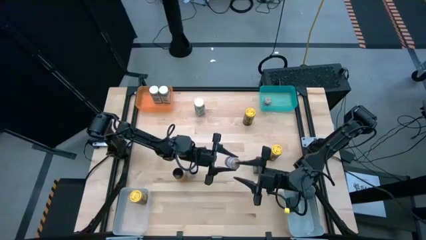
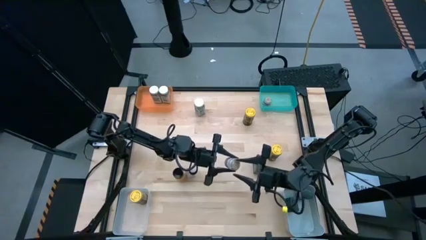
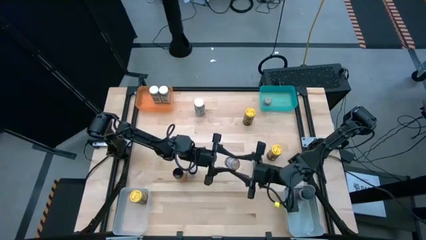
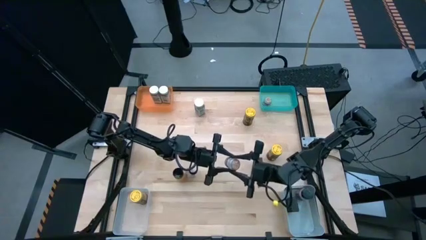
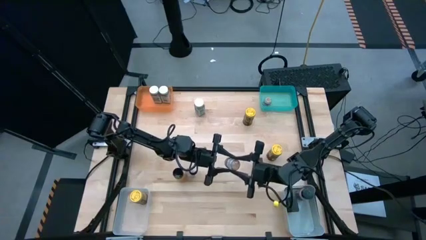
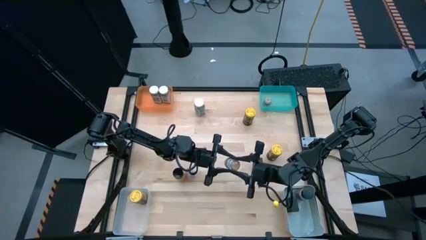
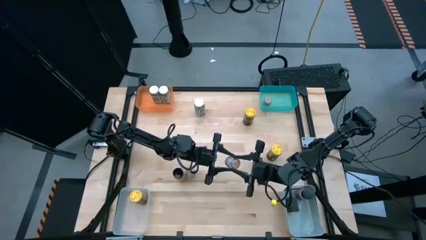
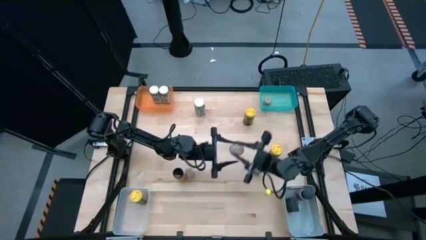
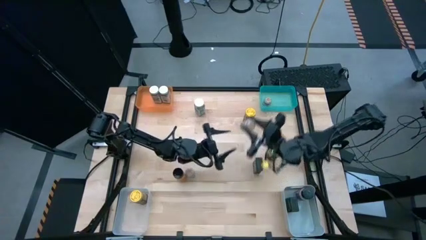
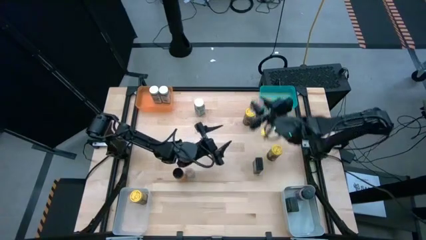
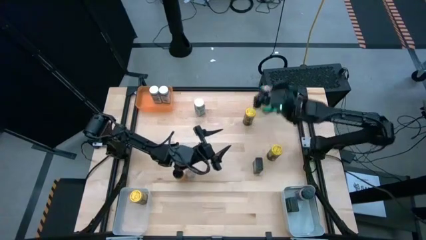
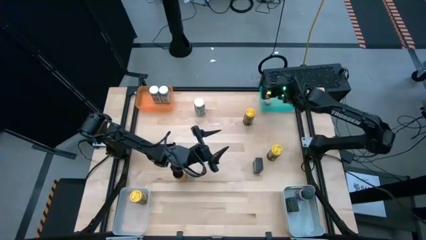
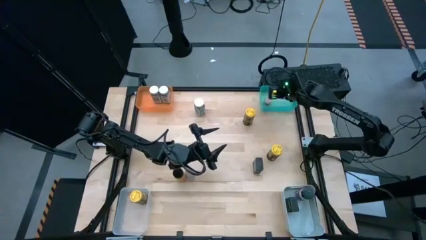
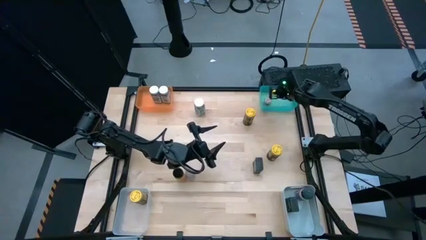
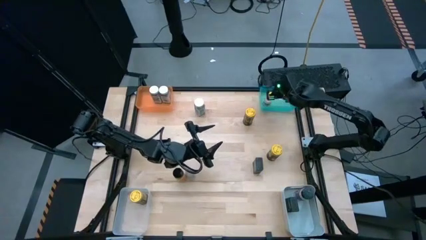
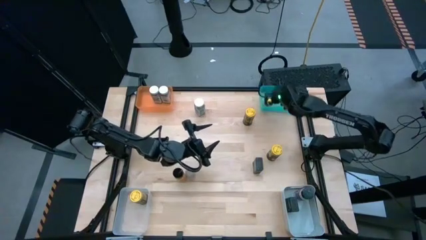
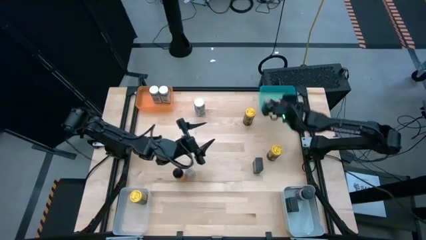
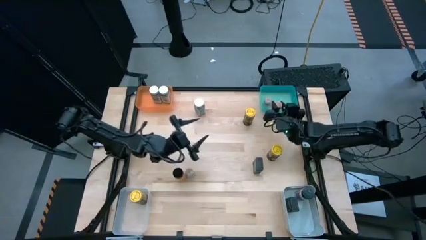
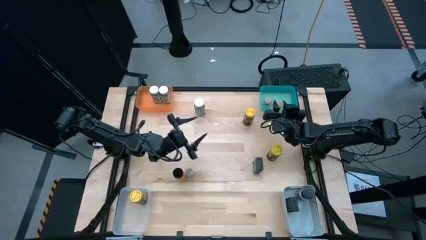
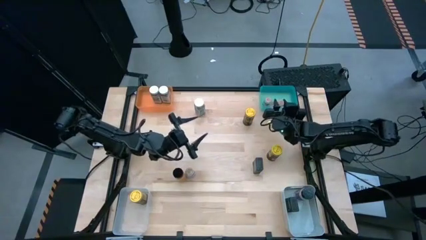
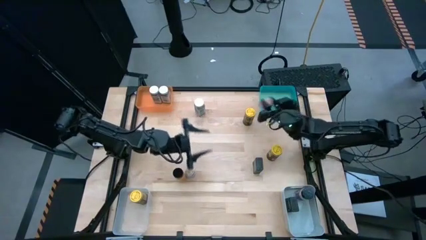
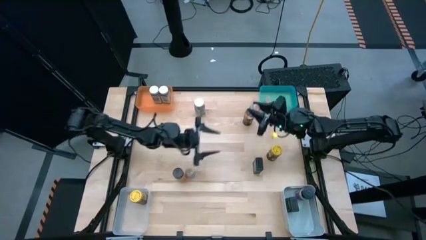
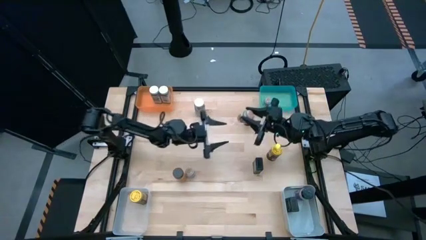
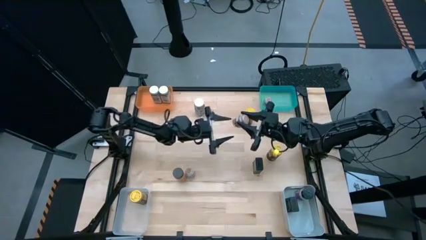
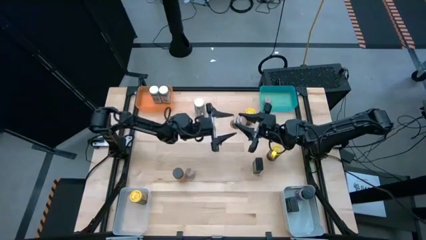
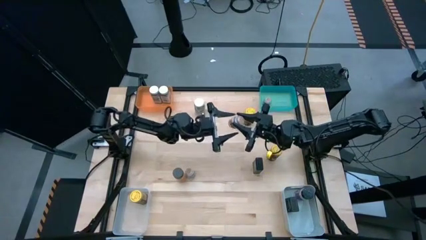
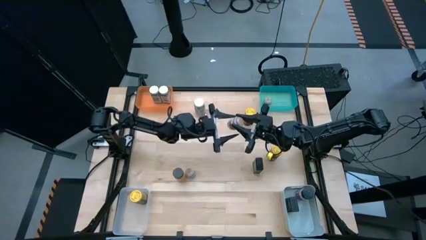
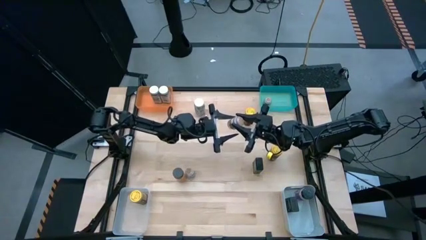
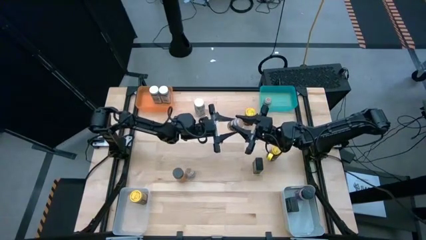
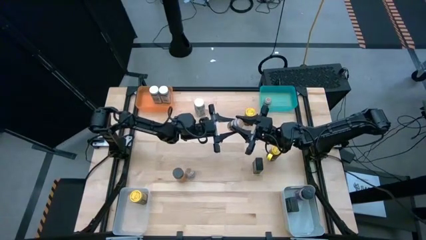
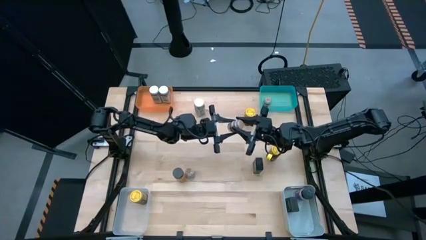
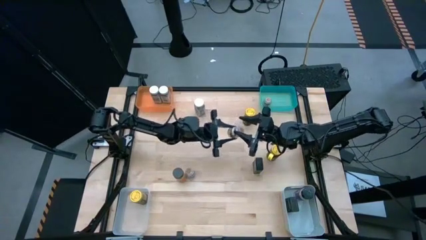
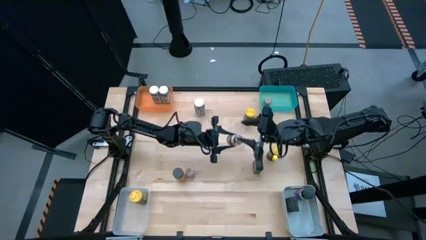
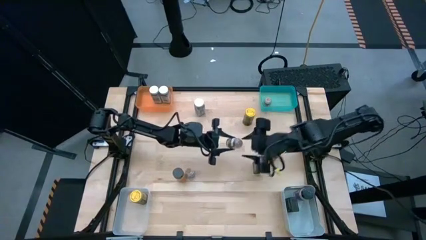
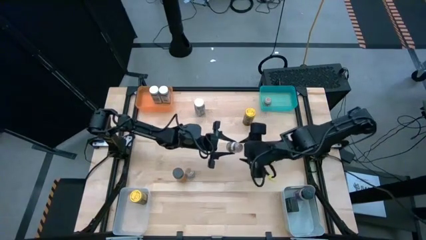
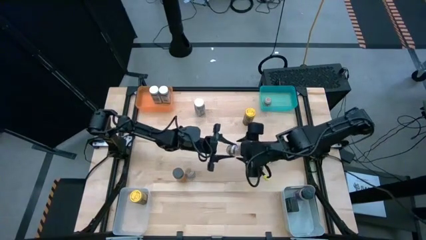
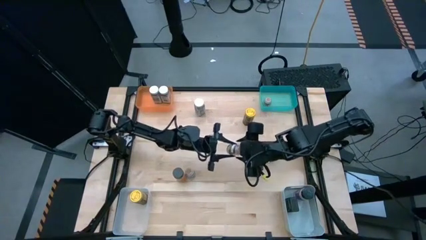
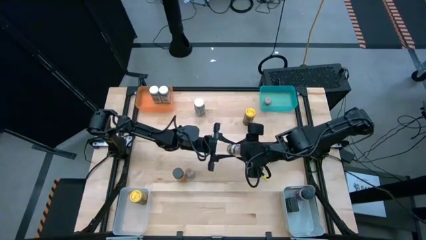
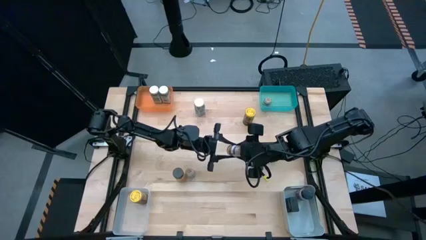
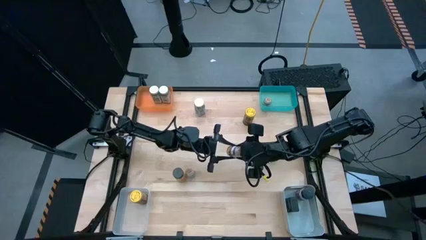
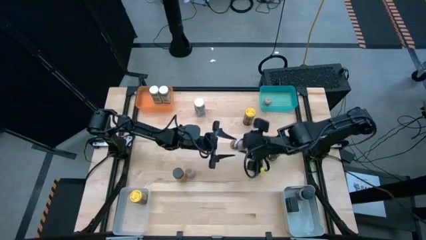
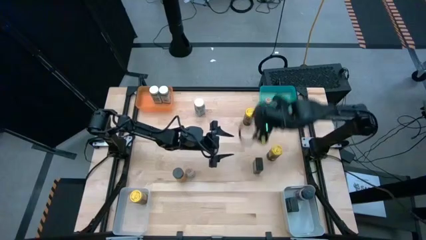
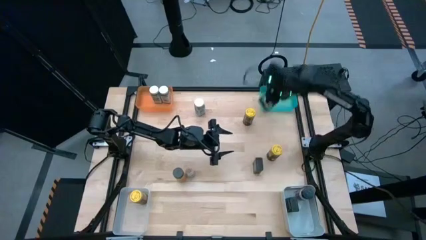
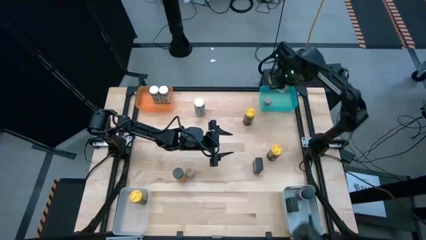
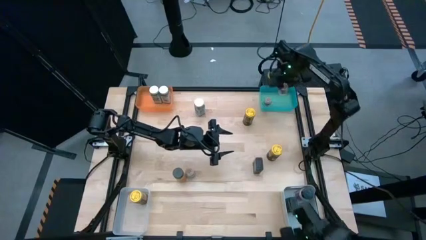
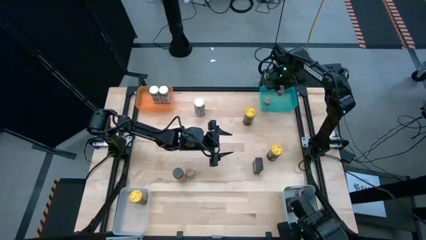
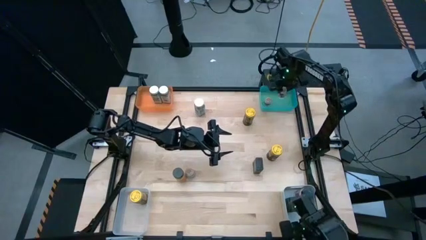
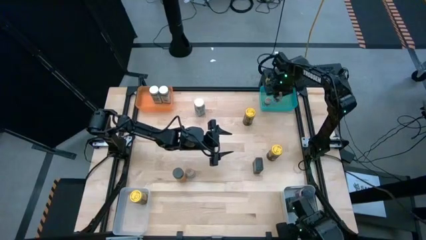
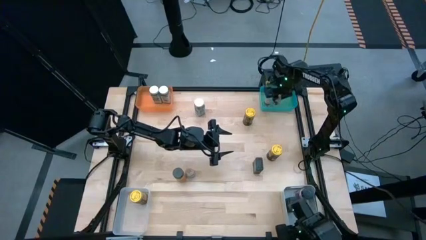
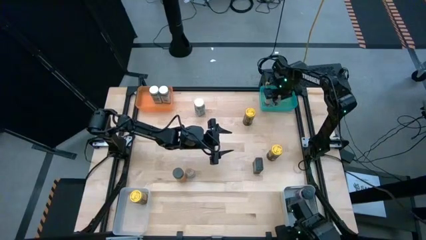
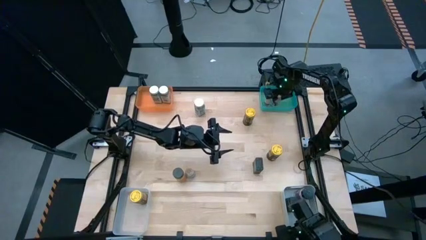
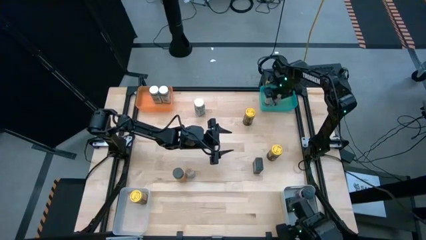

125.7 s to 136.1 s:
Task: Sort spices by type
Put the brown seasoning bottle into the blue bin

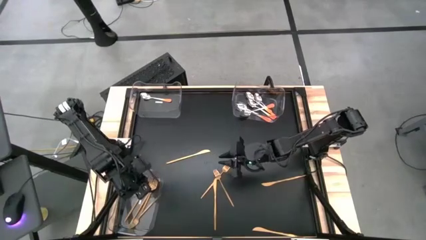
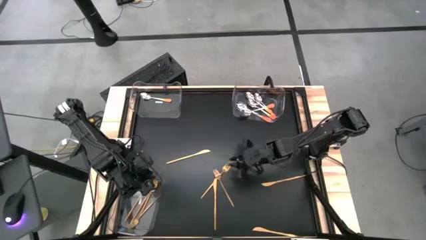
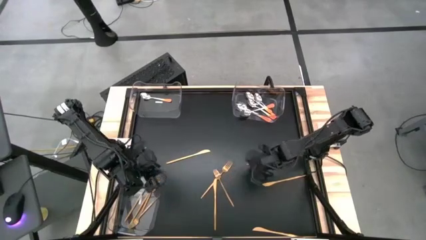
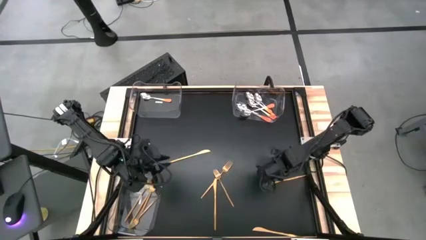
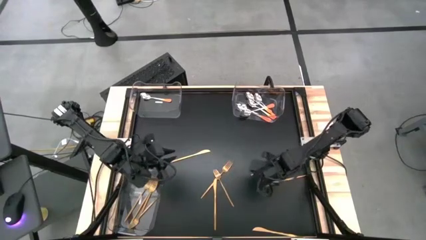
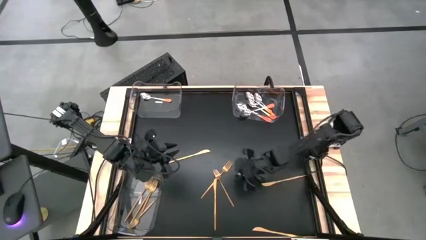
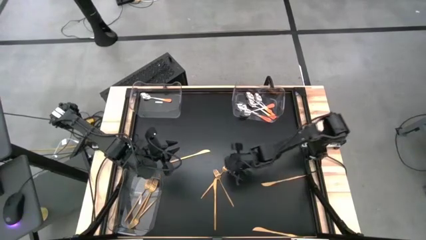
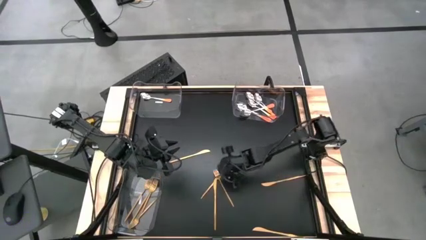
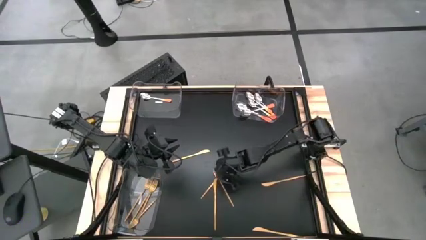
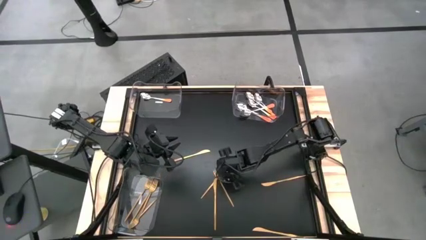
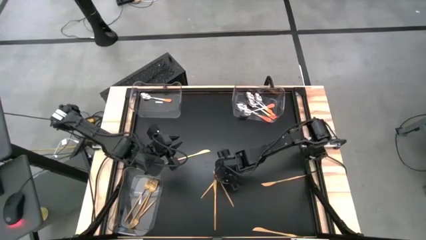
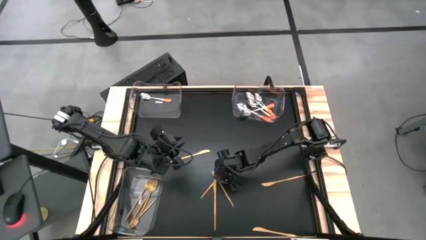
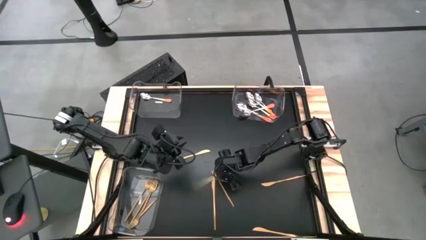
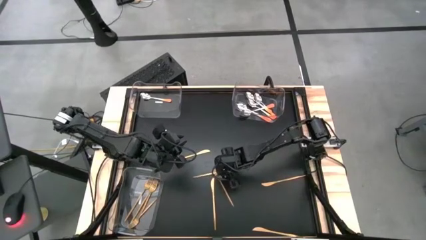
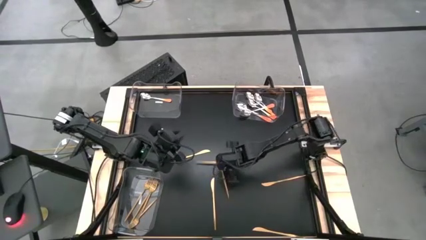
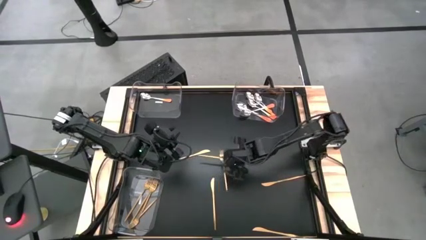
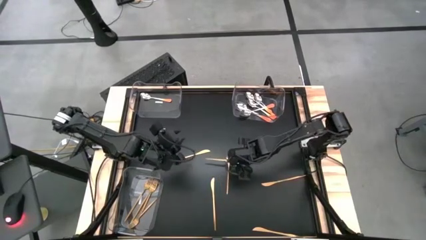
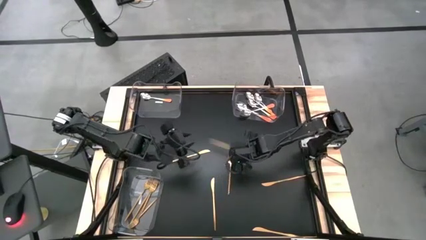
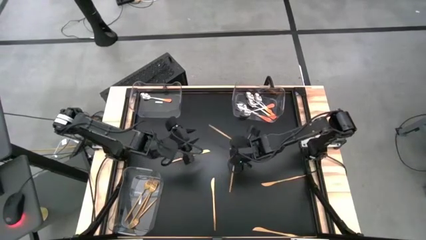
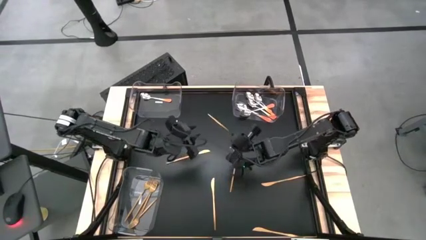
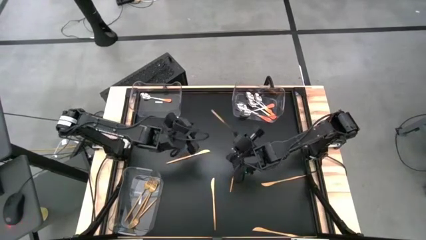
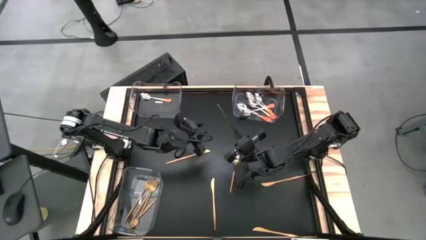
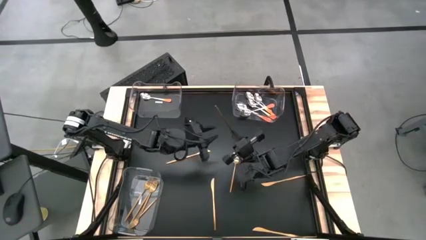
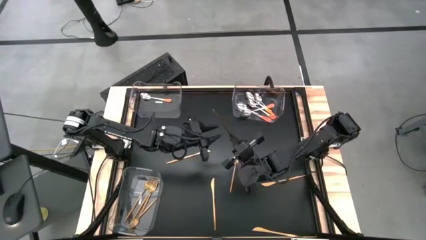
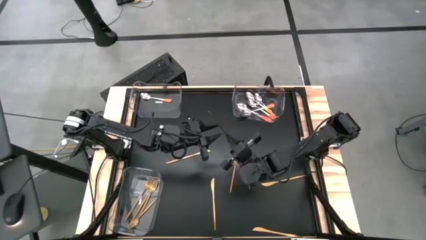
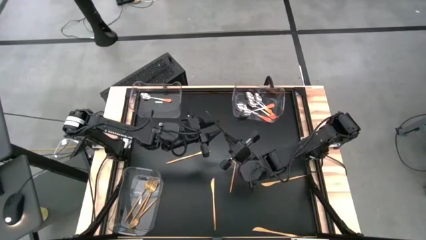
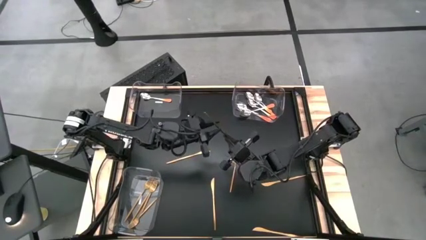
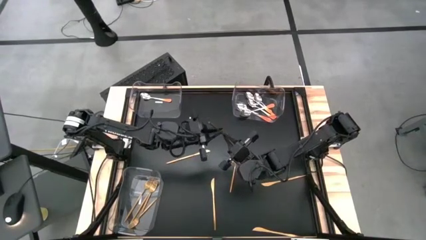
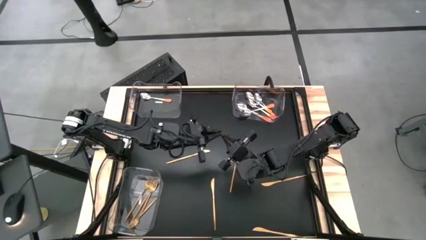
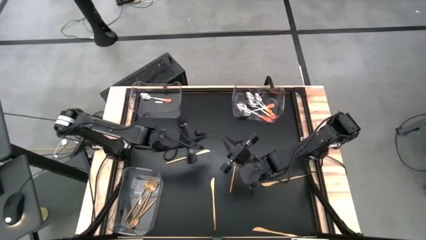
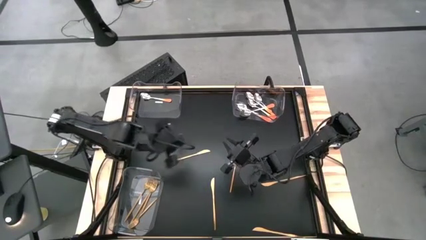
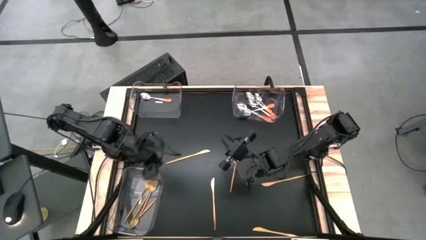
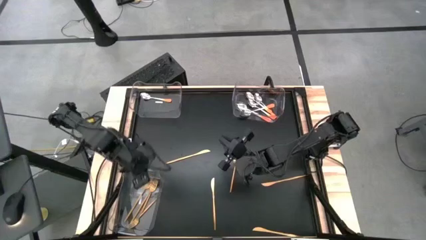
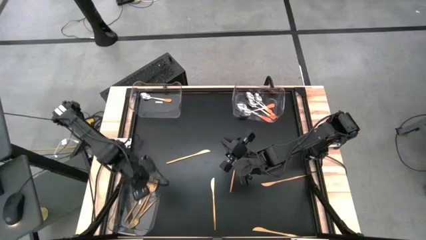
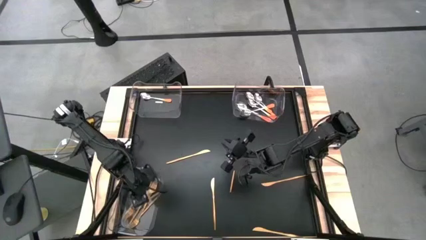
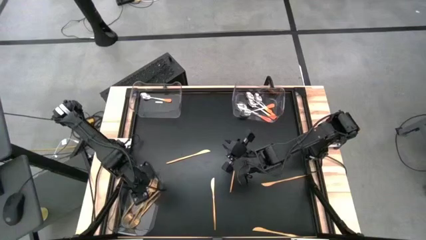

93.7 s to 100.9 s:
Task: Sort silverware by color (type)
Put the gold fork into the bottom left transparent bin
